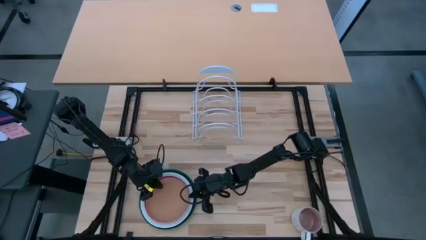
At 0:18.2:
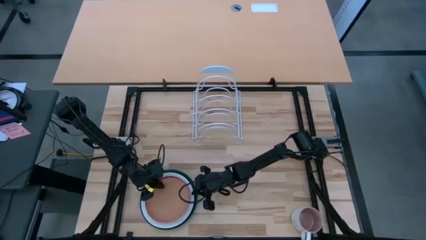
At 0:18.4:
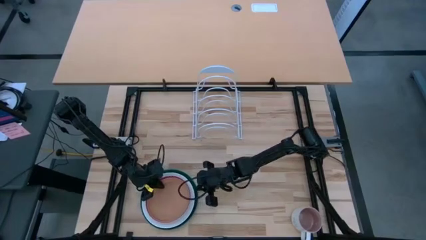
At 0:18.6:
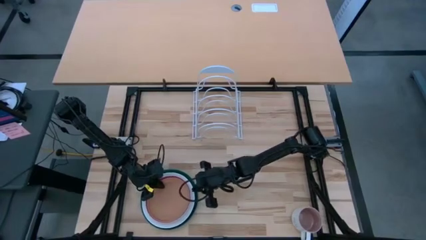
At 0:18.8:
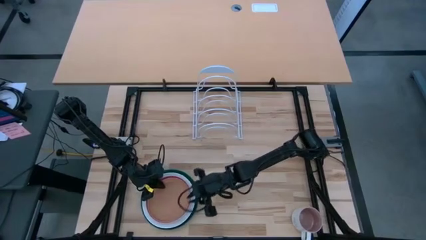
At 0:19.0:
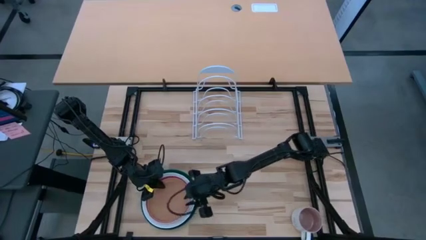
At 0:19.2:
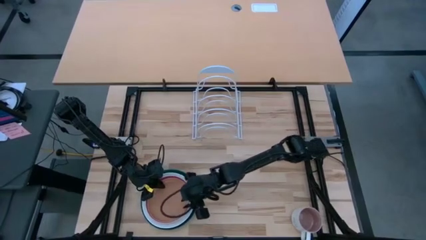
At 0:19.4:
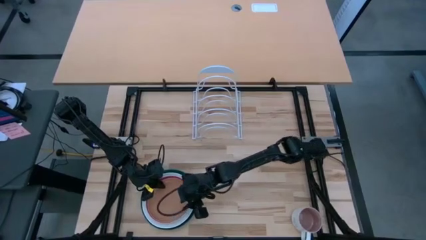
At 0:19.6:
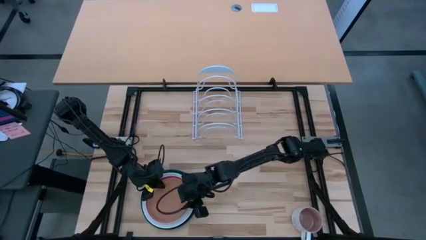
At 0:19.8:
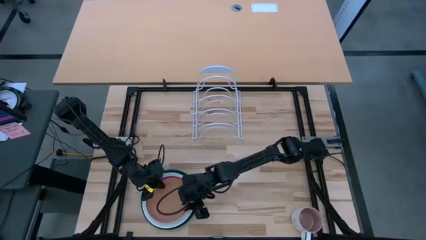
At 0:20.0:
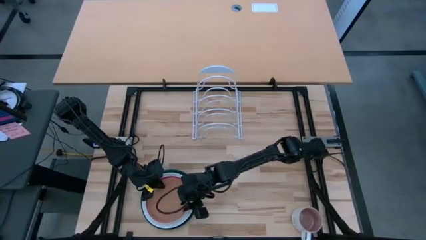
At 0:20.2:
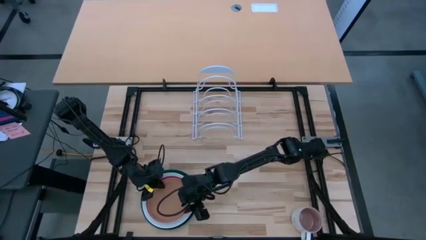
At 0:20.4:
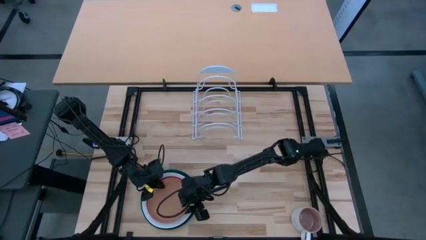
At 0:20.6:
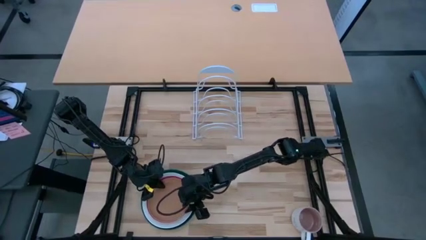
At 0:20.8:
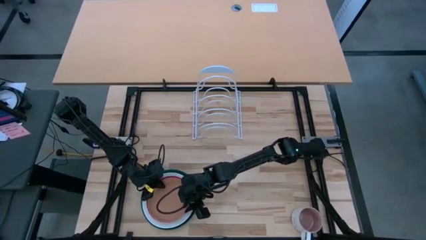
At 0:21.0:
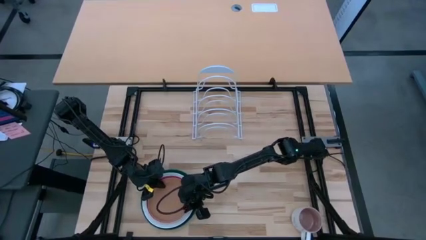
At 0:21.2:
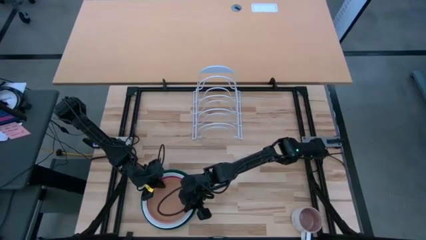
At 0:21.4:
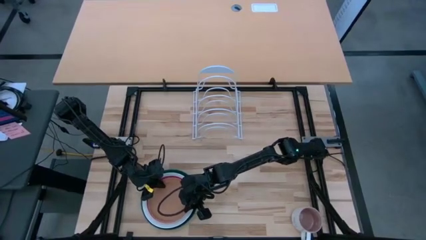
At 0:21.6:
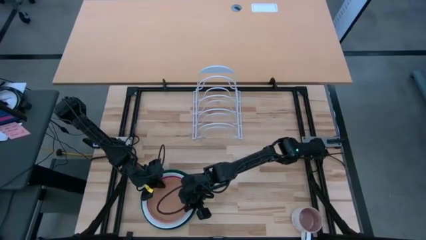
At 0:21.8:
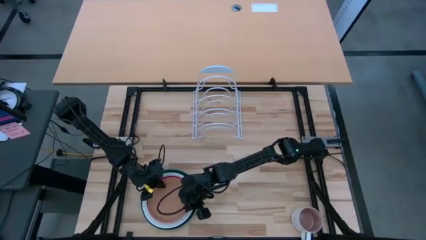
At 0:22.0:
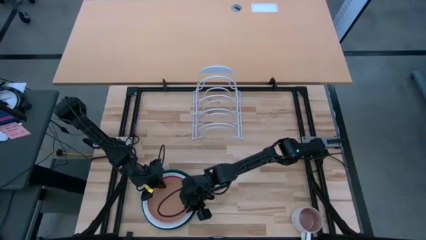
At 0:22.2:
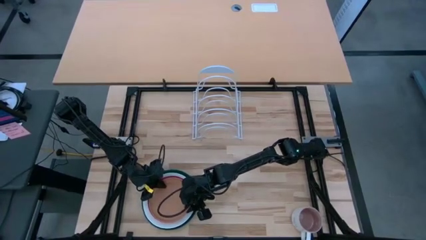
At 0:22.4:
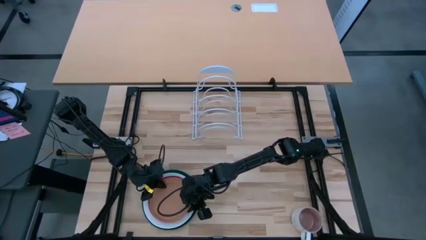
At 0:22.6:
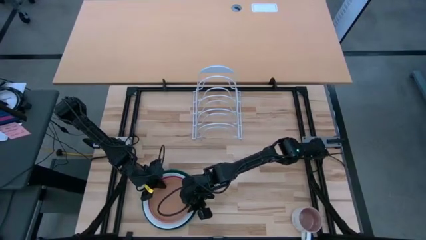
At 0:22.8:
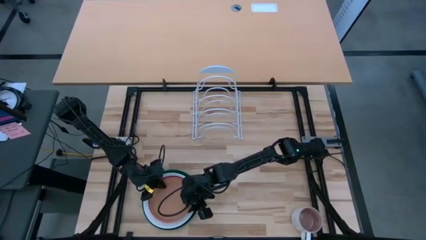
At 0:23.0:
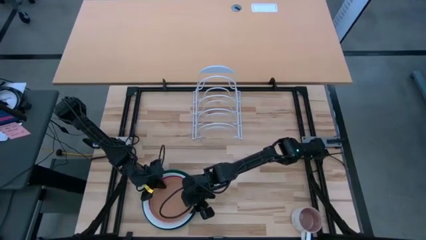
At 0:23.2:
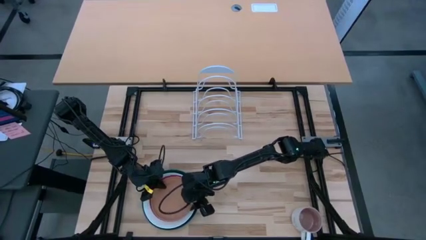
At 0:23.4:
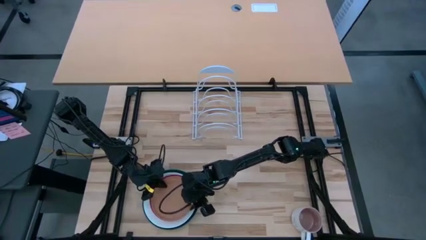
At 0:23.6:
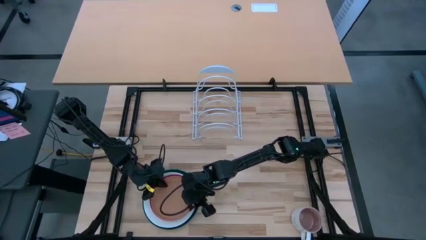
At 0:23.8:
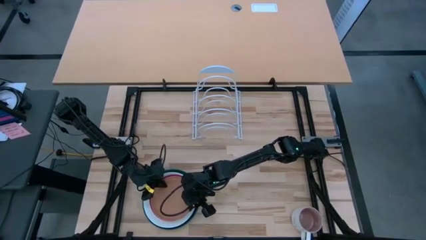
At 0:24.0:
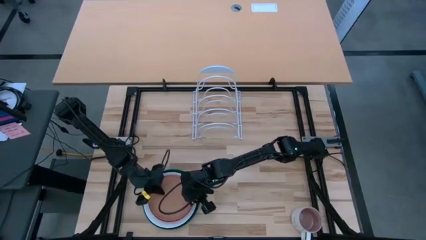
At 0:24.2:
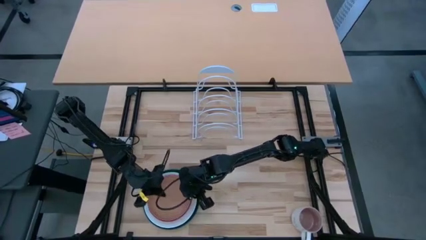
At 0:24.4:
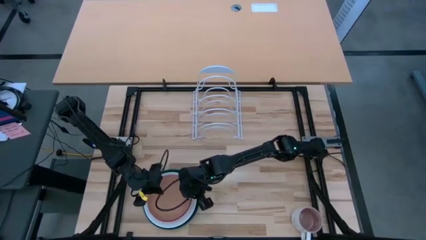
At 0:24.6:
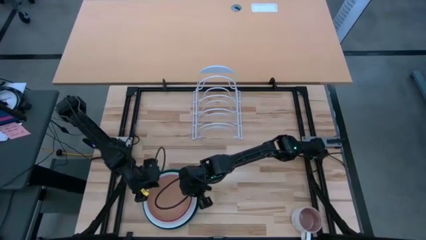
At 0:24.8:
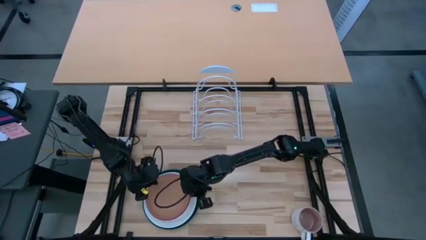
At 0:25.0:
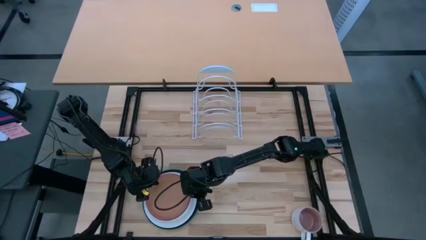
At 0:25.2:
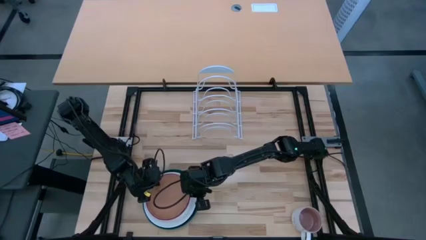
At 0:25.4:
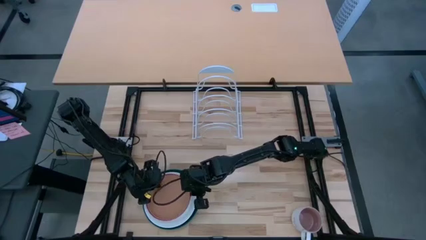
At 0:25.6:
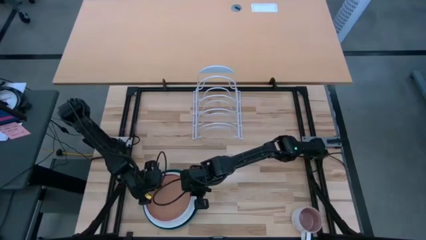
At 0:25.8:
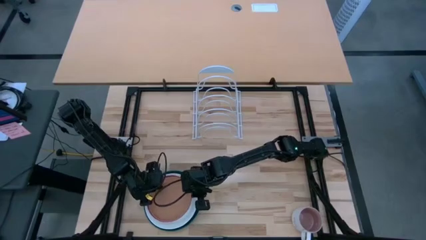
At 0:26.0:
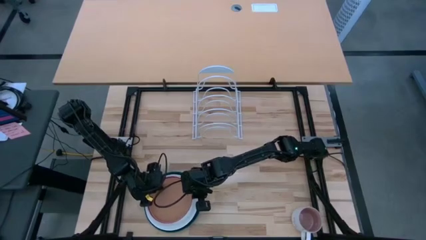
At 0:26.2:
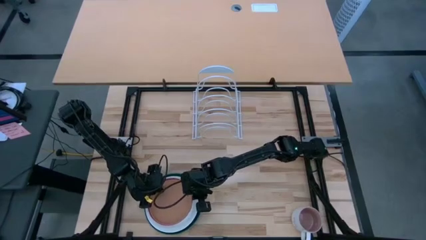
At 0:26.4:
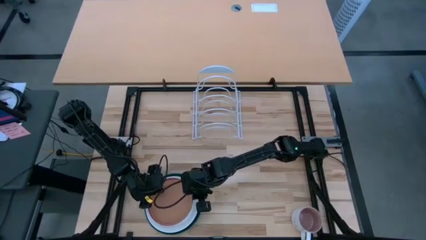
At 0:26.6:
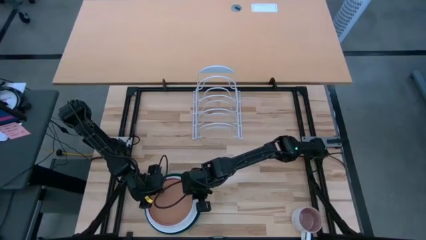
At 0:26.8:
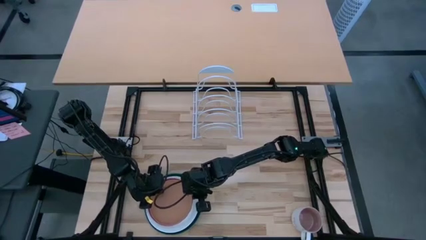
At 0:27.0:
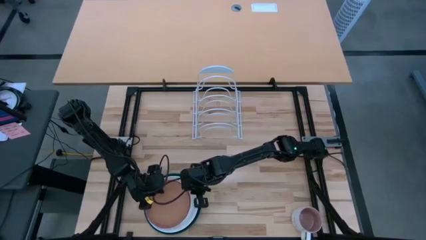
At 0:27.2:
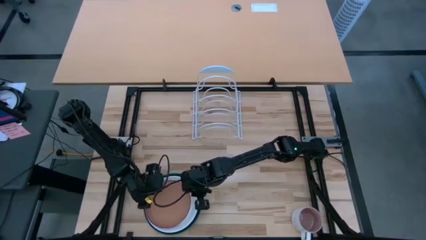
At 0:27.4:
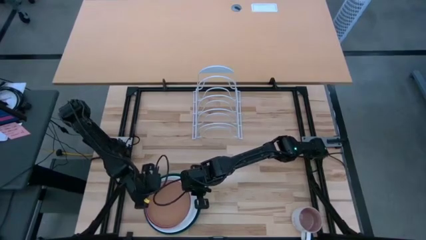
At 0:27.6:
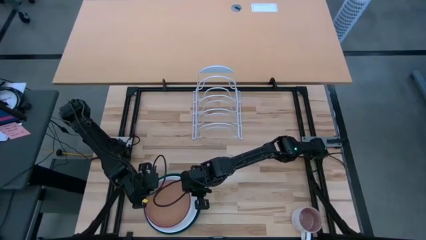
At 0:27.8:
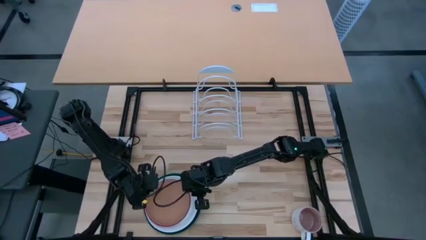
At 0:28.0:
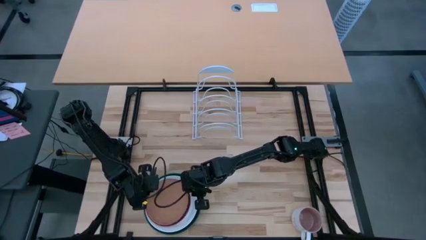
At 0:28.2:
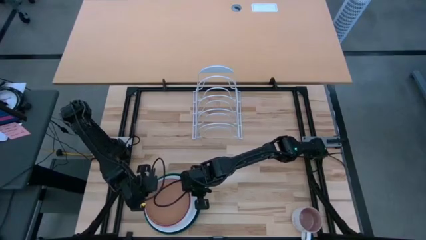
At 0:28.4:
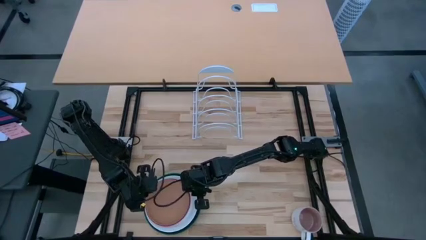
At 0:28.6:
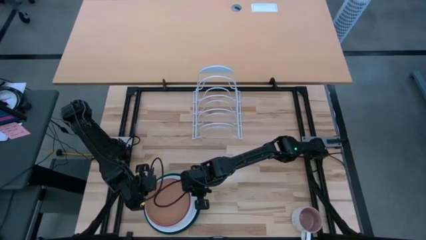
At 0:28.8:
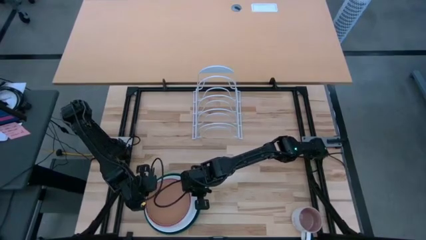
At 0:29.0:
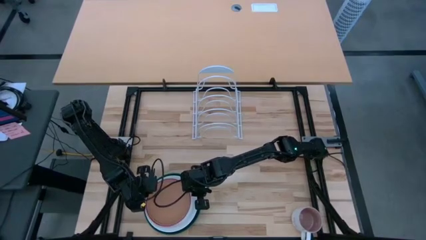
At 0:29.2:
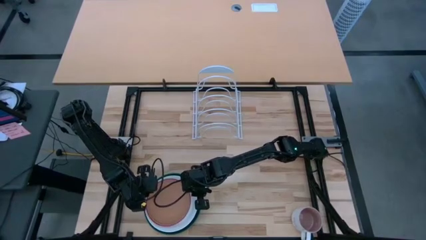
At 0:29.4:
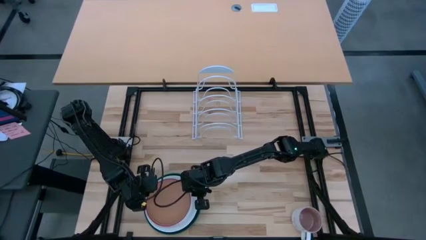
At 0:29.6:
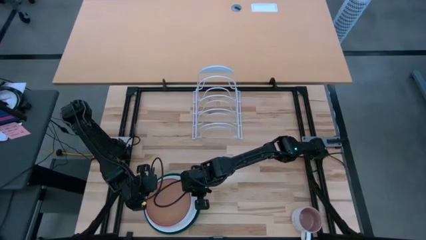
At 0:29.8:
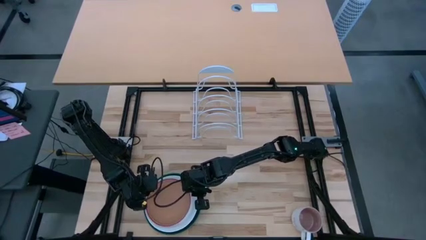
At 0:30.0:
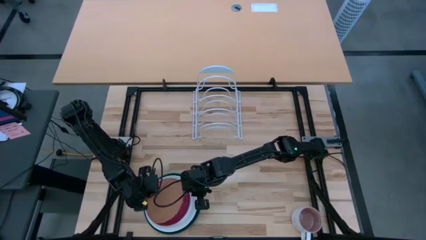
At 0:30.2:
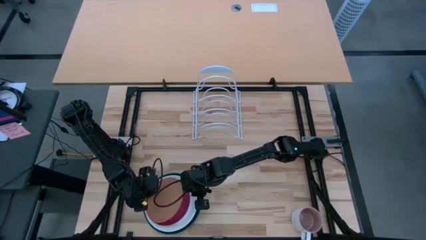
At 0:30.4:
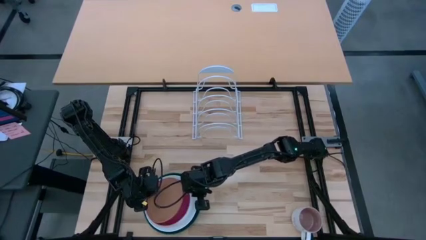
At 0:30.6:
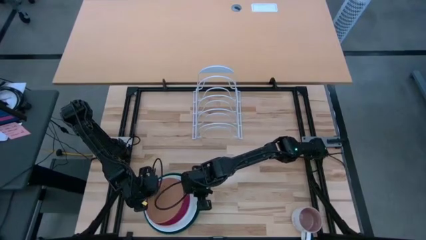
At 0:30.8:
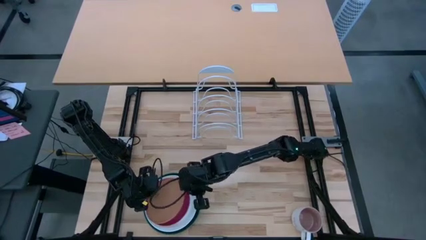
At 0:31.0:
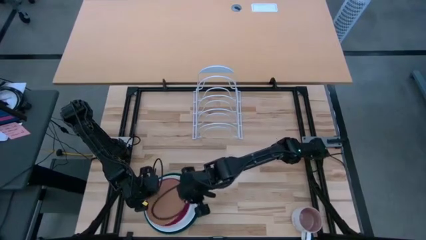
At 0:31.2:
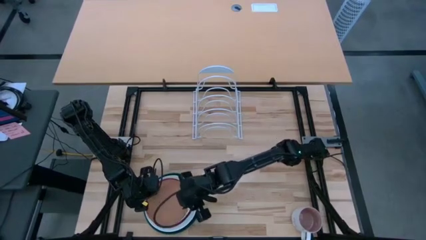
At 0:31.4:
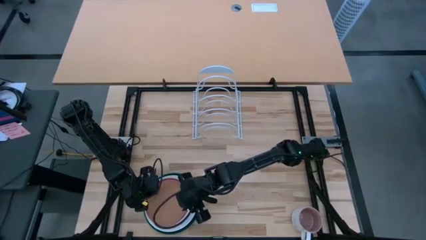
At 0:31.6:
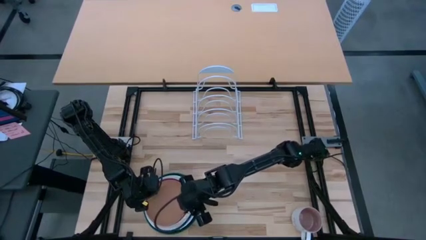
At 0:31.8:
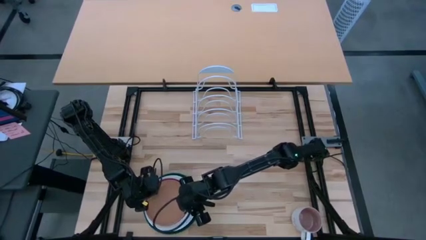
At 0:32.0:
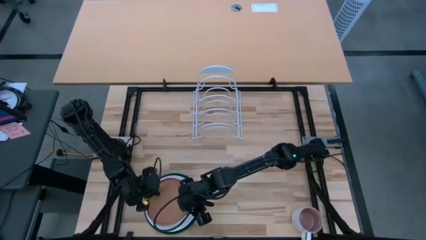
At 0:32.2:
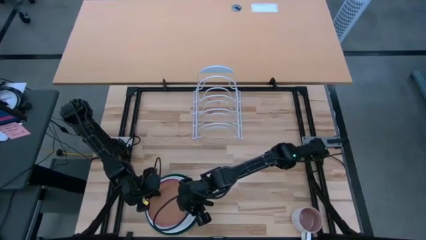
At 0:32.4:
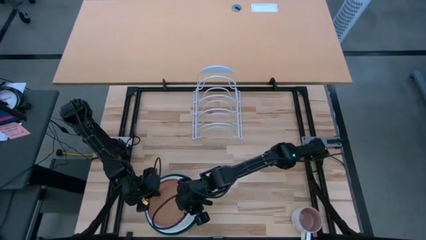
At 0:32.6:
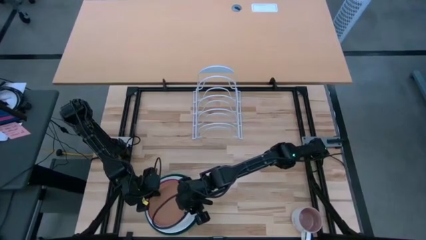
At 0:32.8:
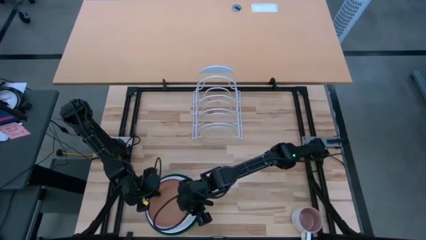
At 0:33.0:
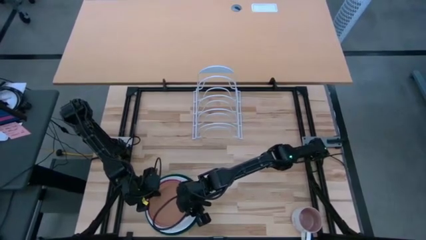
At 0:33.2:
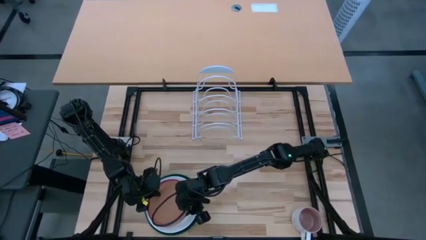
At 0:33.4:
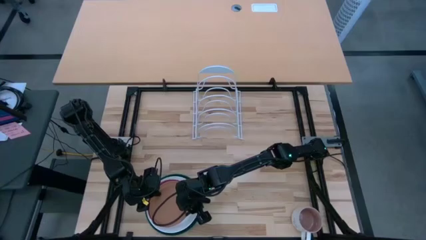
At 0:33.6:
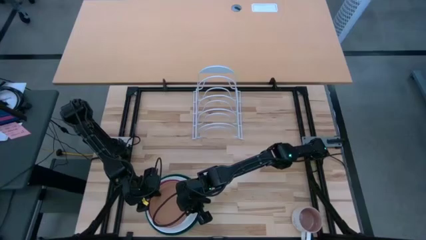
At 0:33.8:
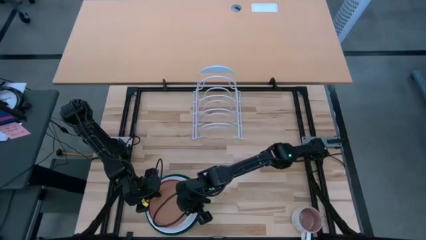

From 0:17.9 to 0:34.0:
Task: Sort dishes
Put the orange plate on the dish rack
